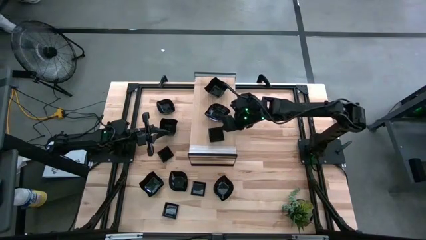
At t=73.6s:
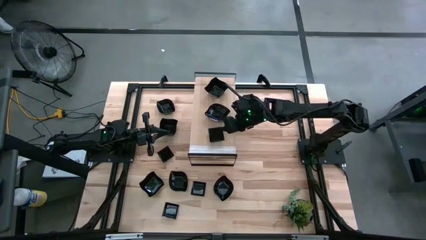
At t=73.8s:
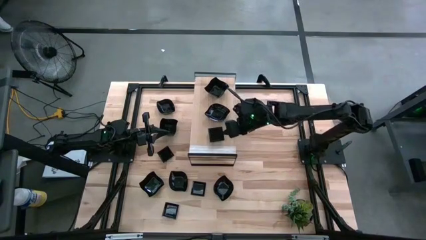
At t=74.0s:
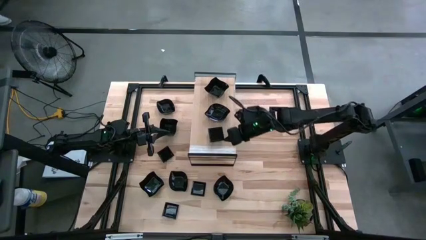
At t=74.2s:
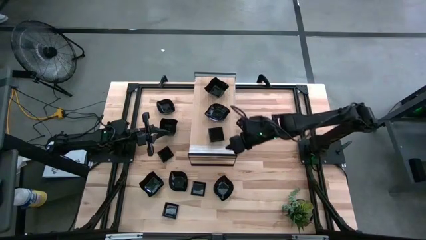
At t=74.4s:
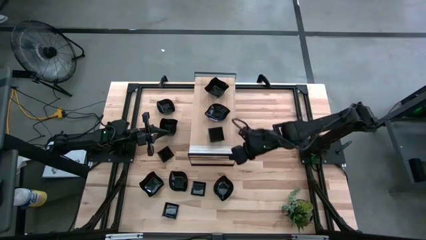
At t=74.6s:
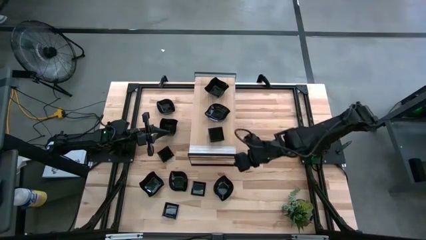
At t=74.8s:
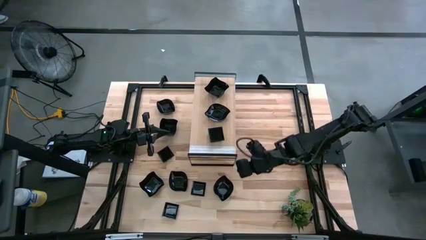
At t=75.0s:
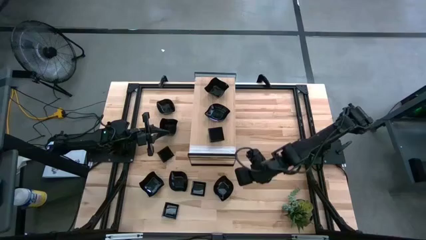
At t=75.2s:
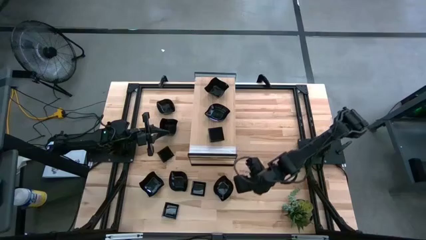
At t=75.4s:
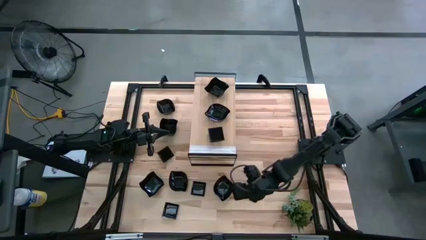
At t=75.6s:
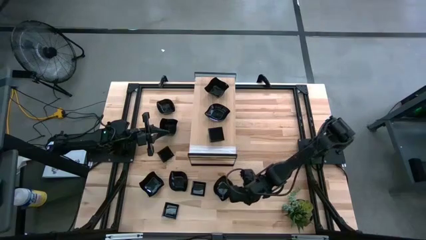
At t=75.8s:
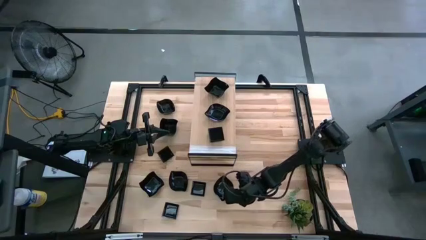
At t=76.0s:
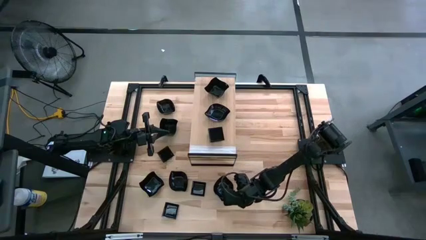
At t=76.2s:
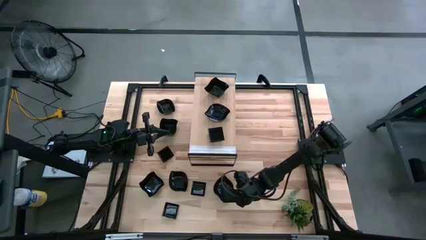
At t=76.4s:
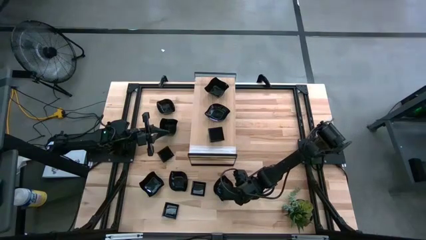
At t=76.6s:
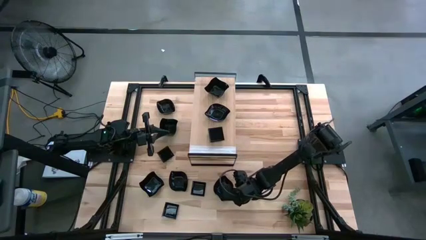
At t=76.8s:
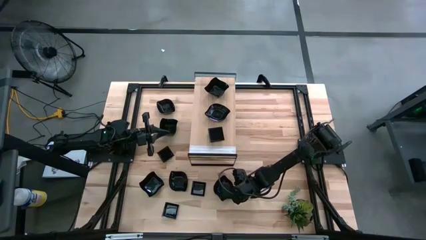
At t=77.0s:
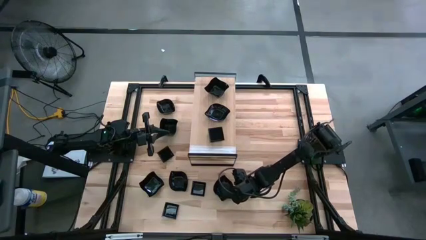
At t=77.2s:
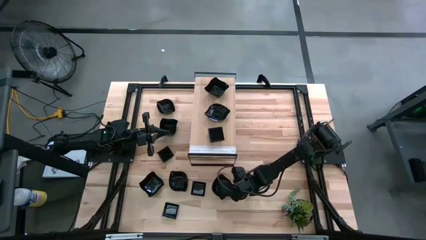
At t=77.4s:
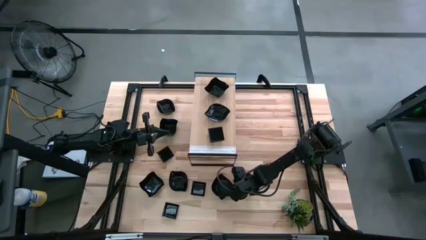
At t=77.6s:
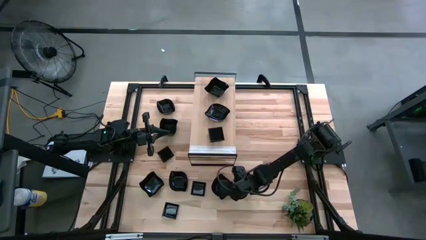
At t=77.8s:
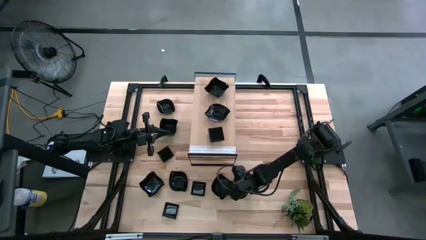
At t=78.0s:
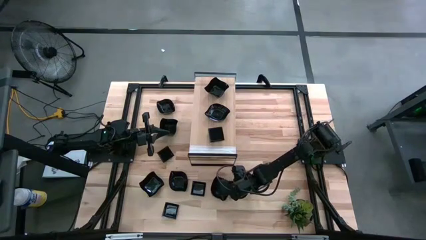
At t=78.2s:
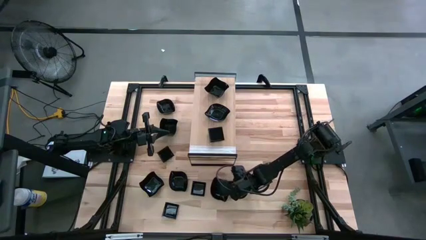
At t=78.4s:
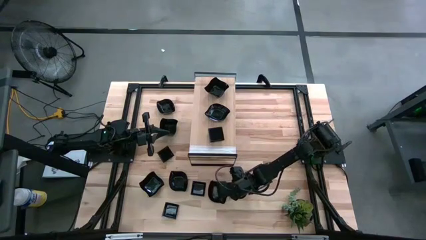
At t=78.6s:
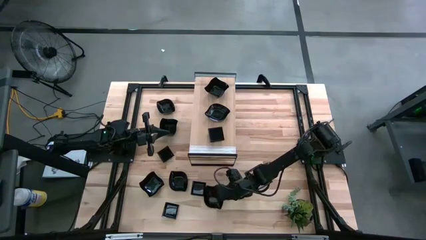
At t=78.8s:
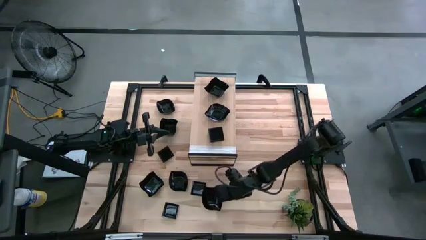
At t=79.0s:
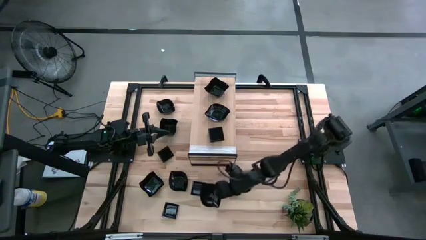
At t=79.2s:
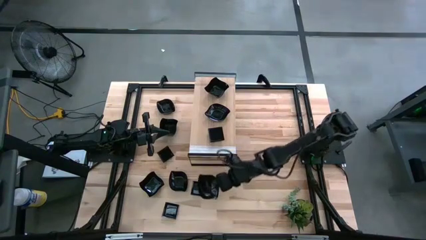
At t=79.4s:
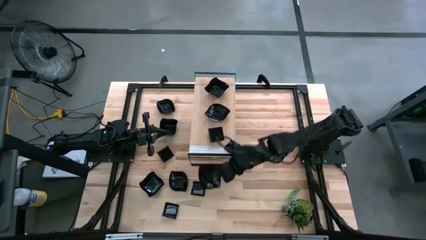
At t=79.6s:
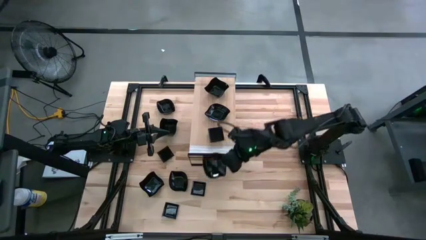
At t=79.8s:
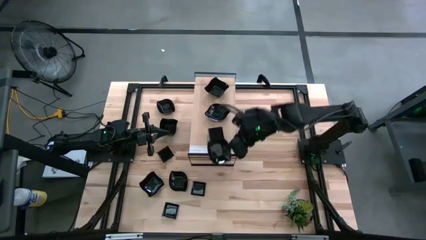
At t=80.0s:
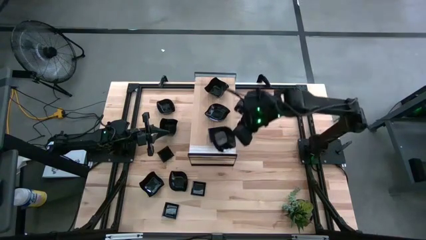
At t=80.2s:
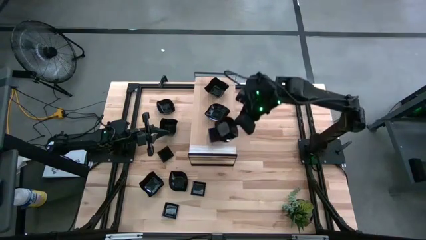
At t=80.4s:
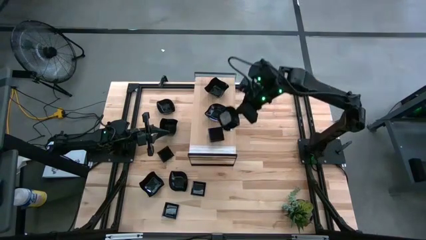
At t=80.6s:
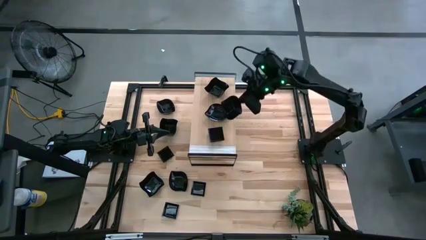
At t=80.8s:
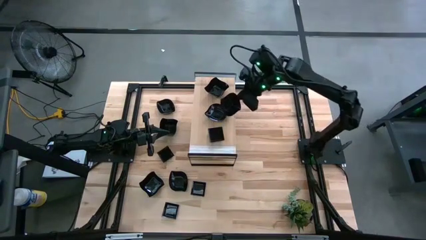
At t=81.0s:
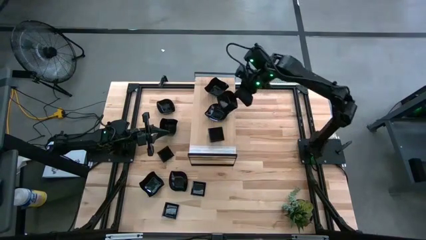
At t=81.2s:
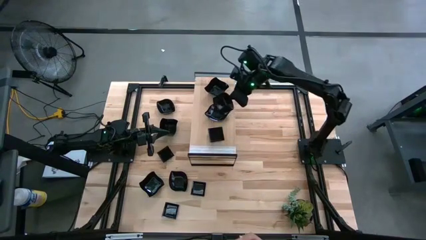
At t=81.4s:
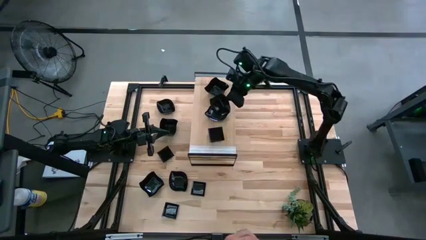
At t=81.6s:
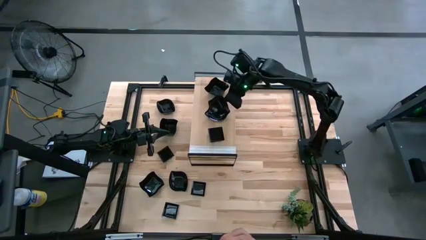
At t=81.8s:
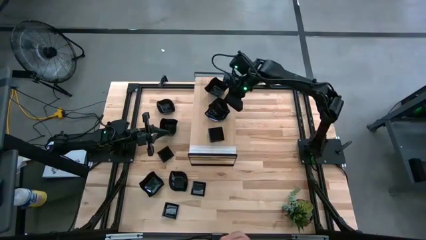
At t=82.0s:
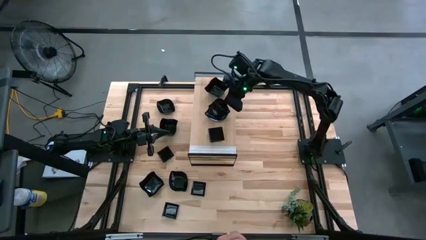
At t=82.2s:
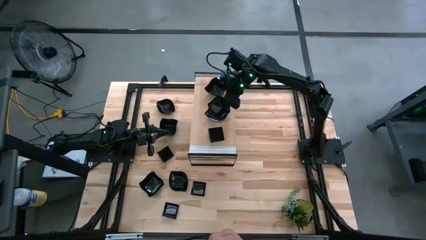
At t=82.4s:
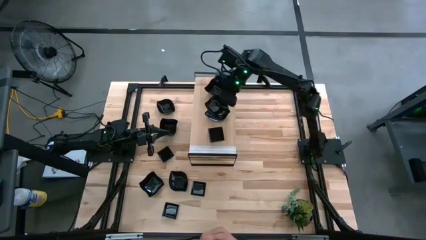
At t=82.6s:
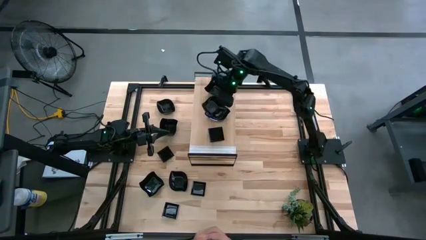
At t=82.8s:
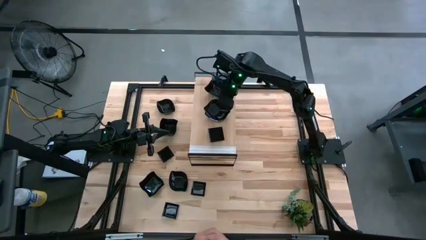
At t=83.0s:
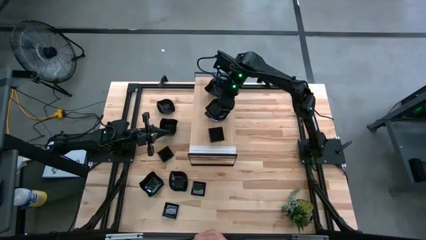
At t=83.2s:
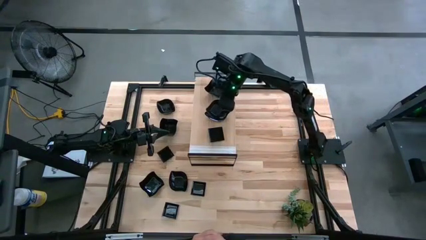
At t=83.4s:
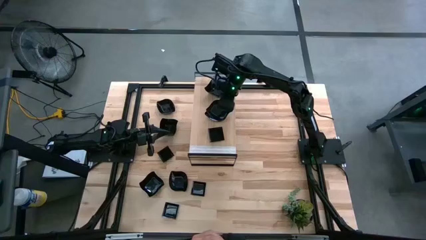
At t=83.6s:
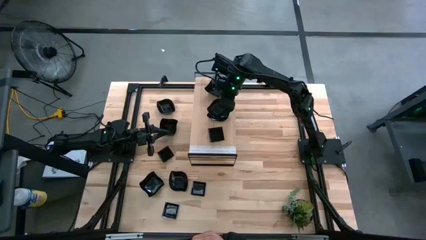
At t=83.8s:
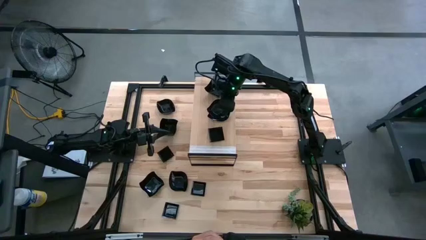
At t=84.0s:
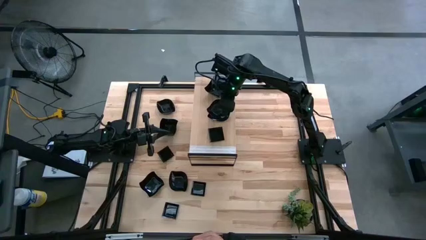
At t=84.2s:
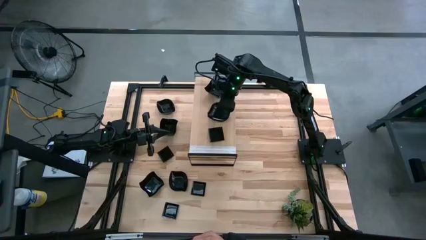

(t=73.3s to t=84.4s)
Task: Pick & Place Mini shaped plates
Stack the leaf-shaped plate on top of the stacked leaf-shaped plates on the shelf

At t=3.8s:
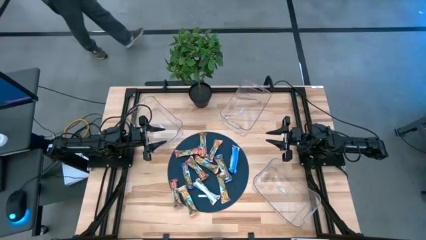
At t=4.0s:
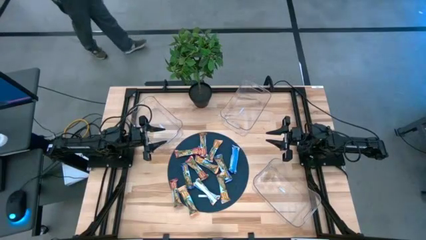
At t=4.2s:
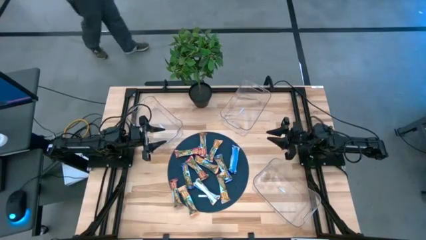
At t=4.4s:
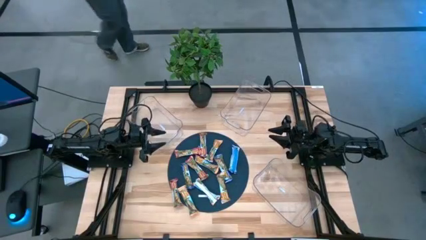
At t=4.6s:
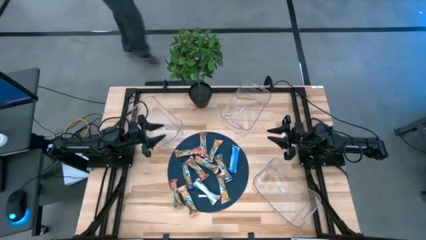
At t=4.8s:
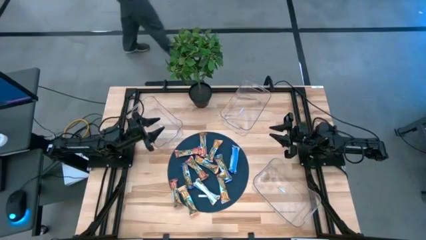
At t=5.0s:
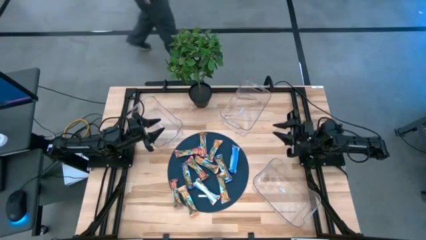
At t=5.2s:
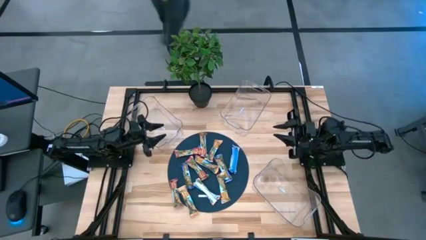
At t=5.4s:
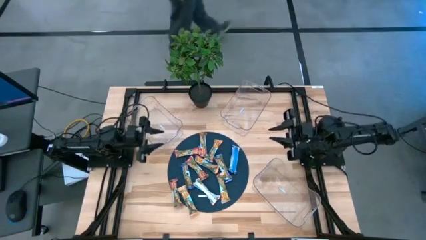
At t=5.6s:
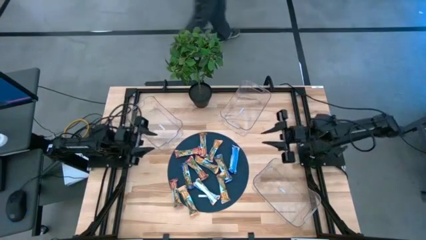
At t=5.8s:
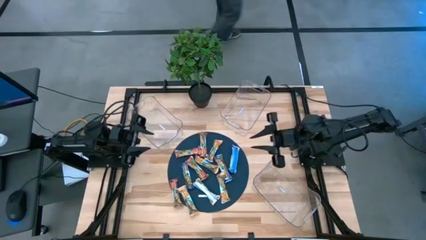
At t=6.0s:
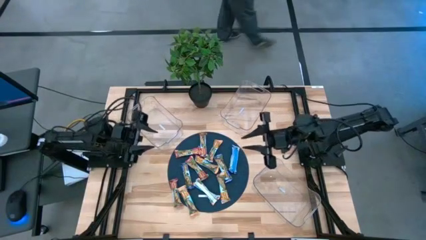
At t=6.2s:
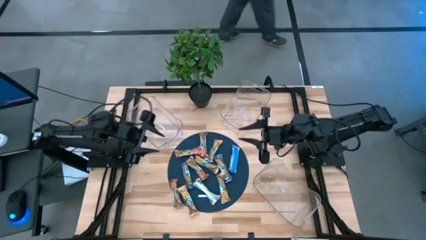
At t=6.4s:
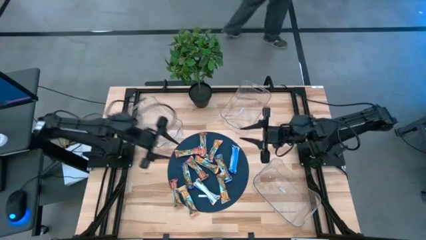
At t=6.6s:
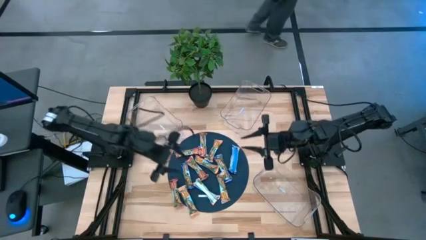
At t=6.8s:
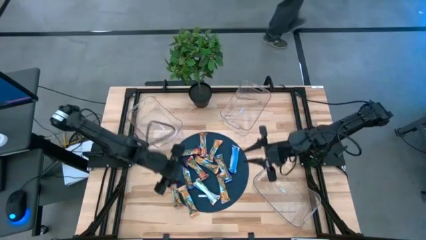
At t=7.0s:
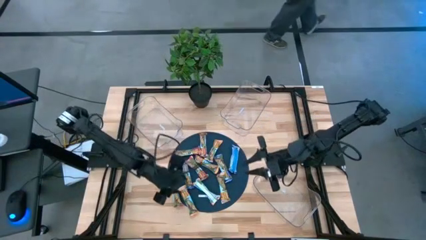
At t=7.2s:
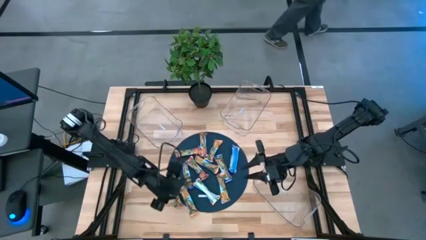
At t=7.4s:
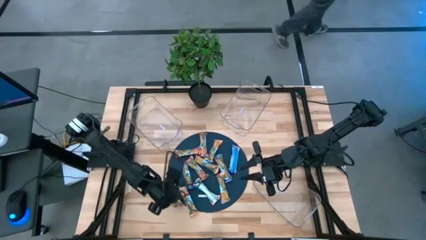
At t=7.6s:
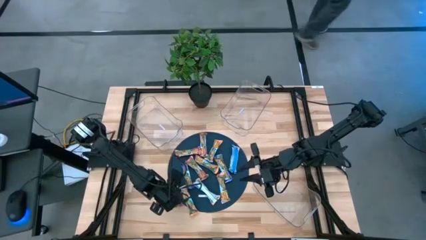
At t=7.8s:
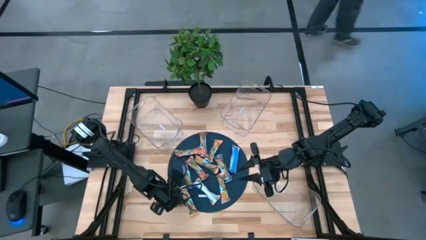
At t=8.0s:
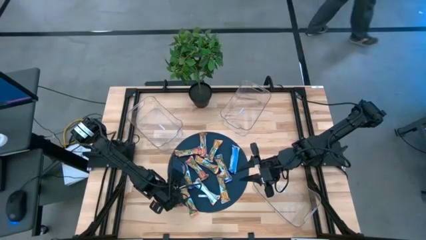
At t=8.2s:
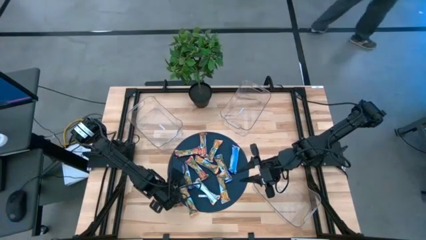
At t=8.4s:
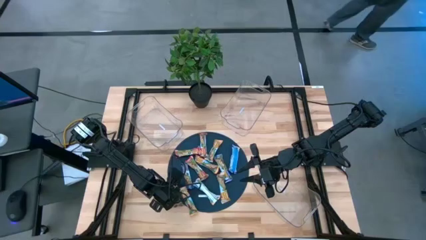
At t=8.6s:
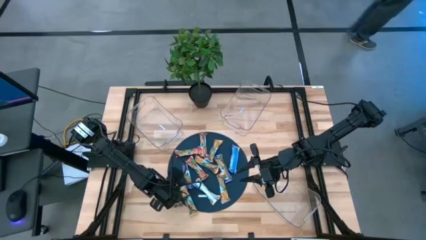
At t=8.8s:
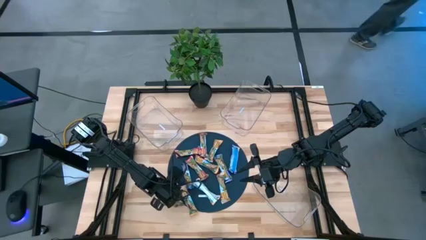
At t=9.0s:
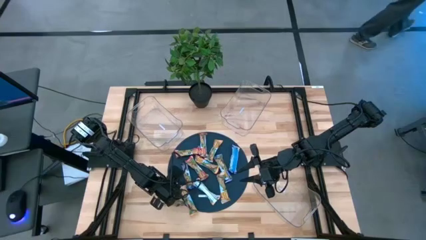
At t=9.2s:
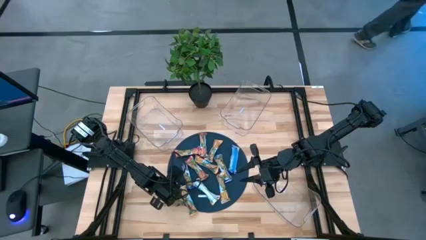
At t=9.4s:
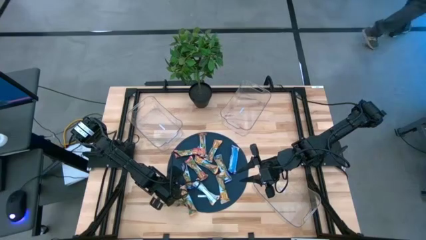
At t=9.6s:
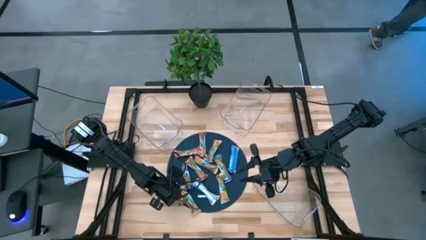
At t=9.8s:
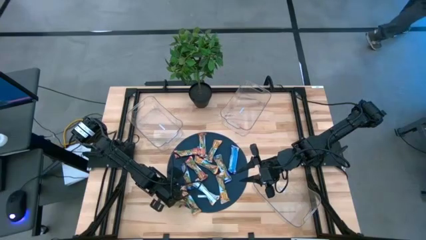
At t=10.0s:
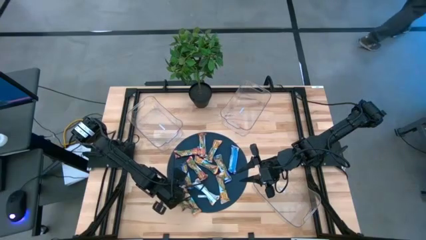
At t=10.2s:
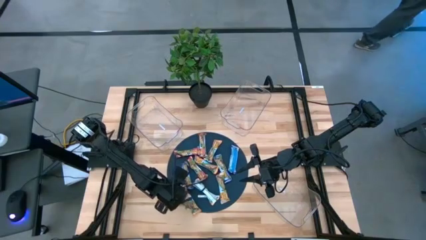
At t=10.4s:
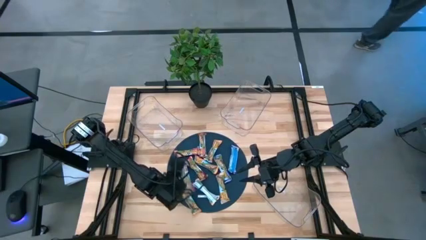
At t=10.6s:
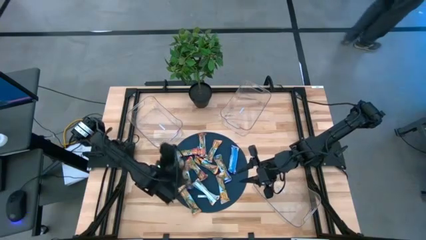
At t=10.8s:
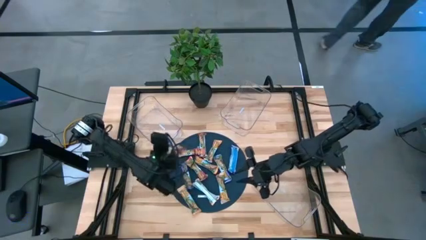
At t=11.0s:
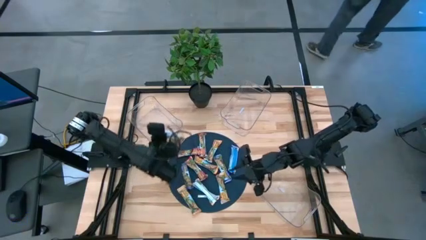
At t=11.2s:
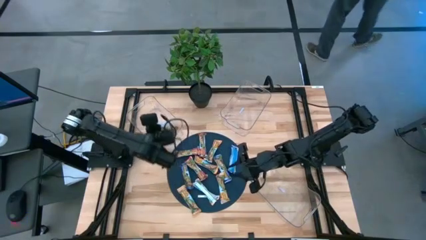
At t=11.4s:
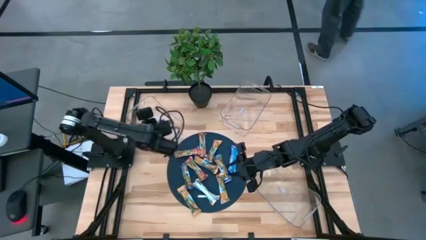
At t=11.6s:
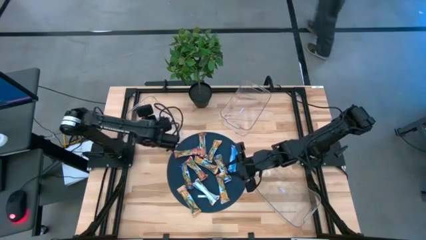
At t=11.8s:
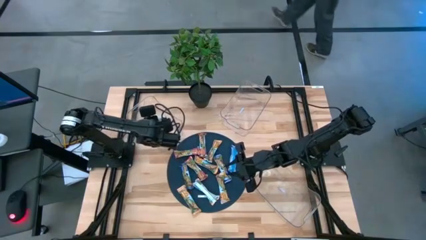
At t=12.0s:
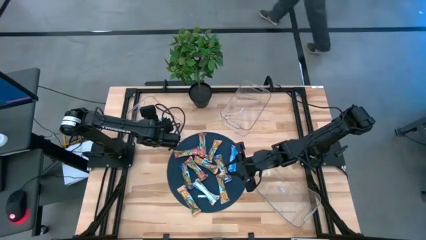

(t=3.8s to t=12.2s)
Task: Pick and place Granola Bars by type
Put the red granola bar into the top left transparent bin
